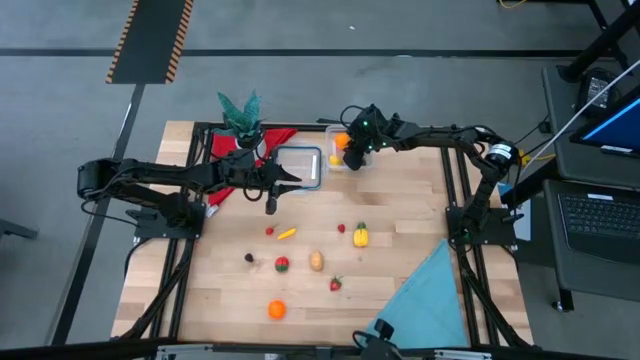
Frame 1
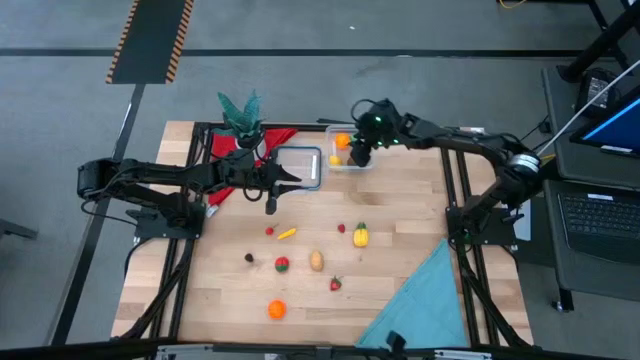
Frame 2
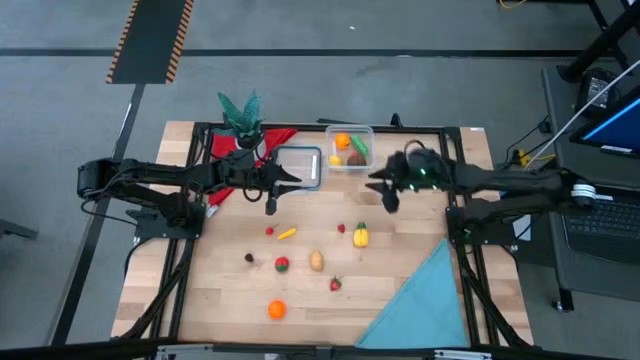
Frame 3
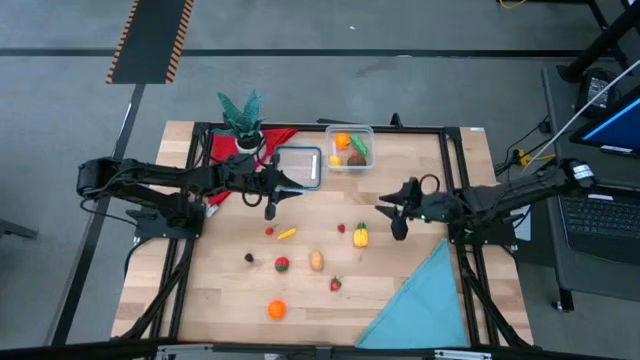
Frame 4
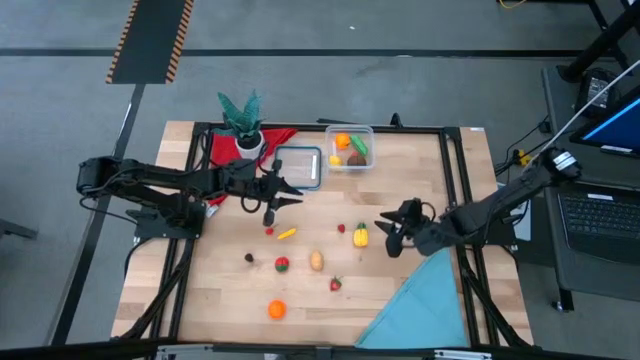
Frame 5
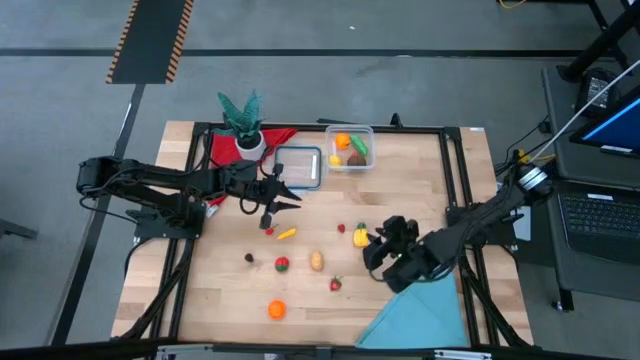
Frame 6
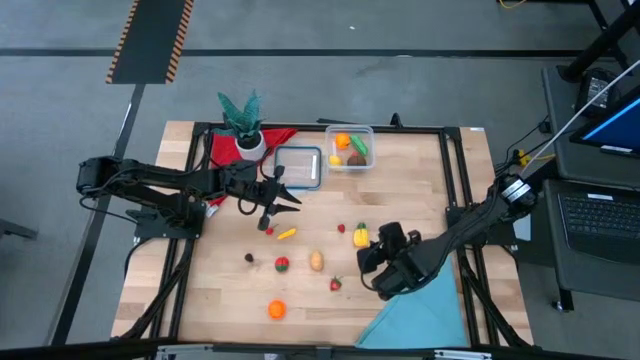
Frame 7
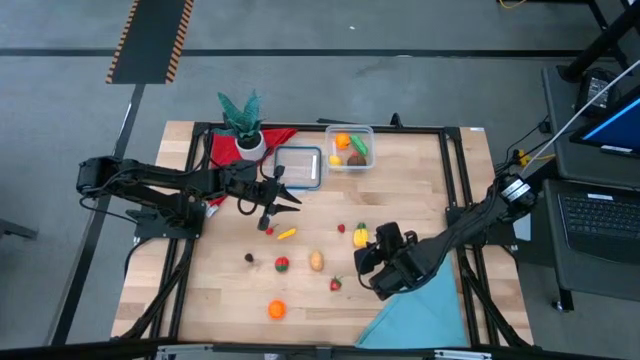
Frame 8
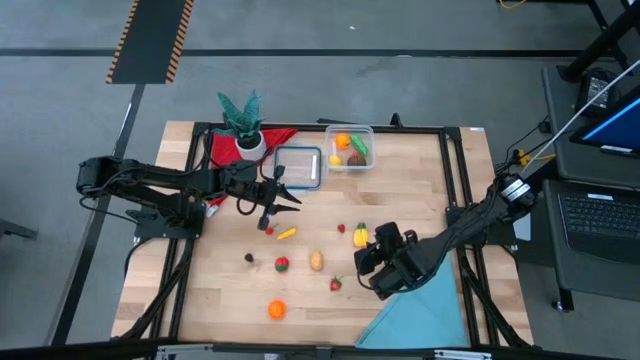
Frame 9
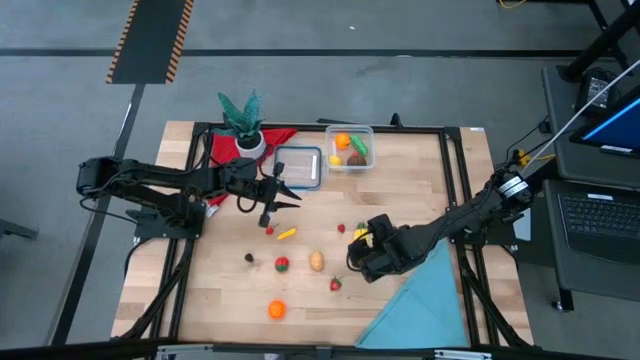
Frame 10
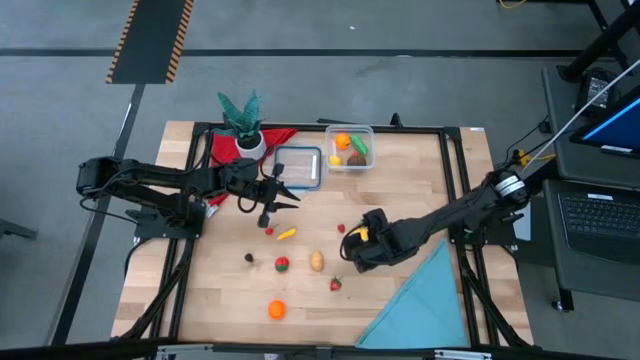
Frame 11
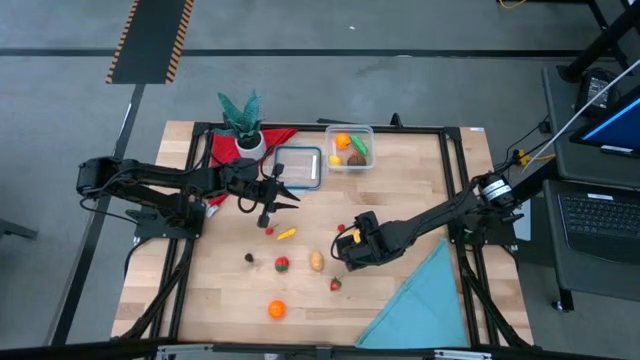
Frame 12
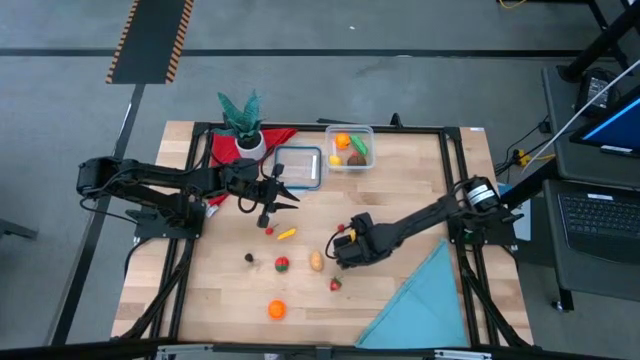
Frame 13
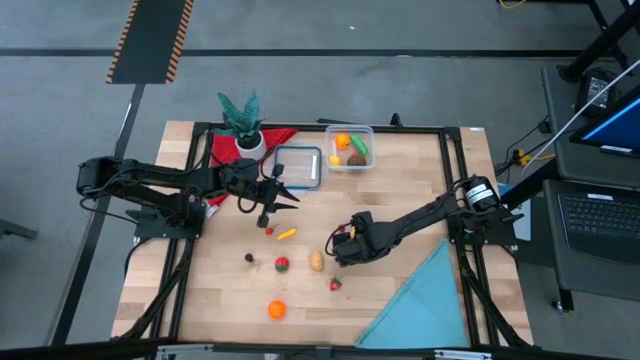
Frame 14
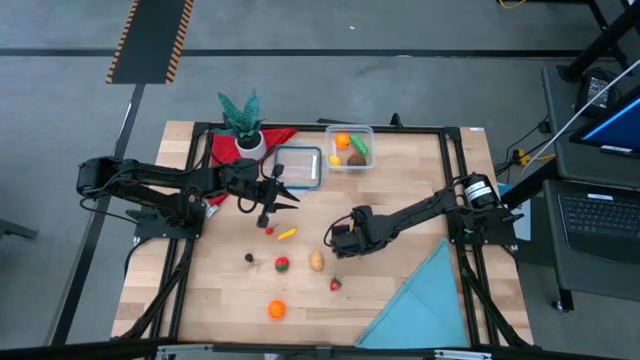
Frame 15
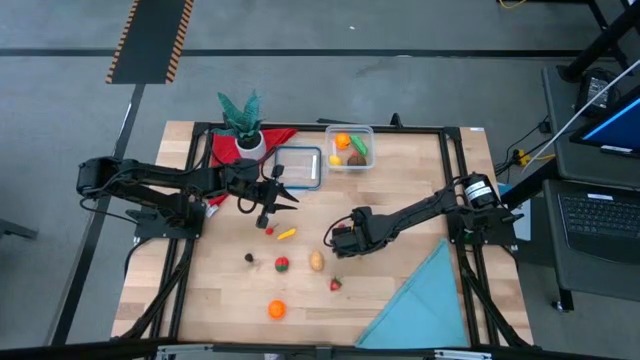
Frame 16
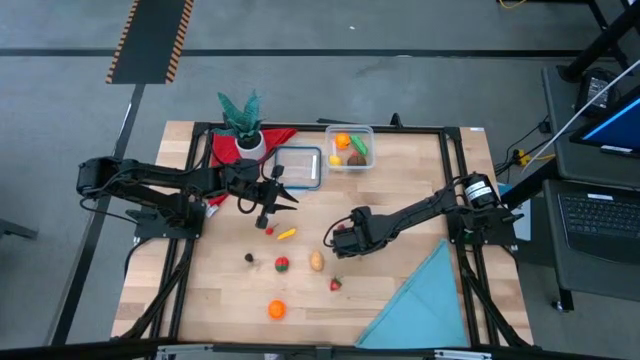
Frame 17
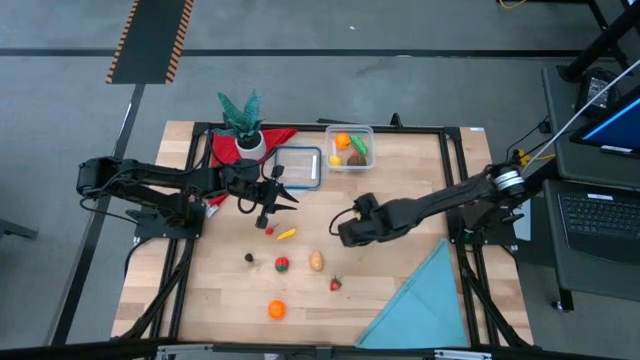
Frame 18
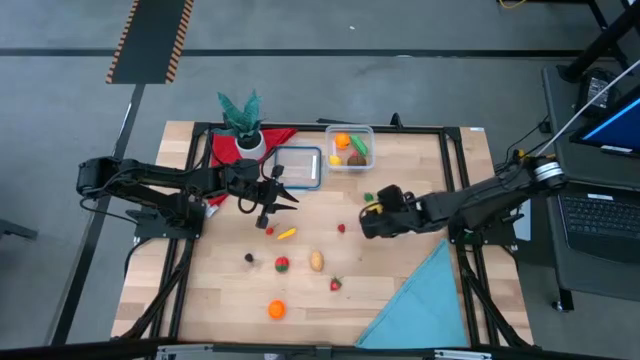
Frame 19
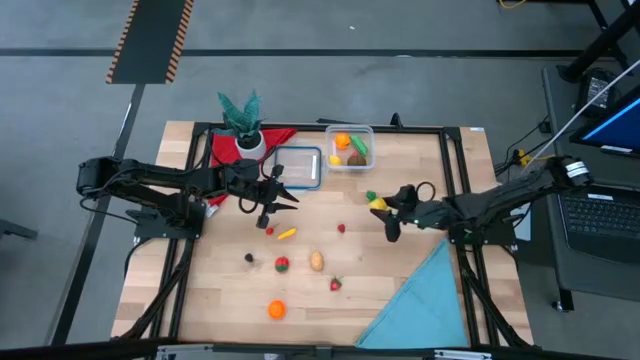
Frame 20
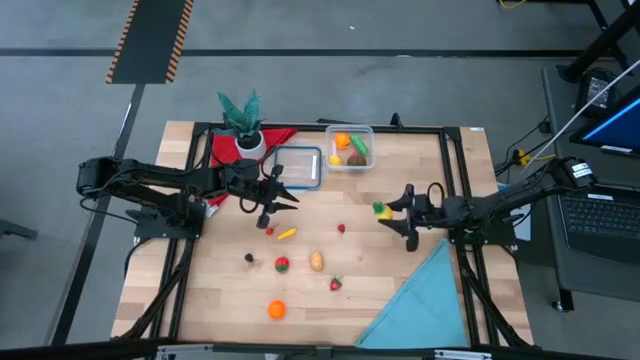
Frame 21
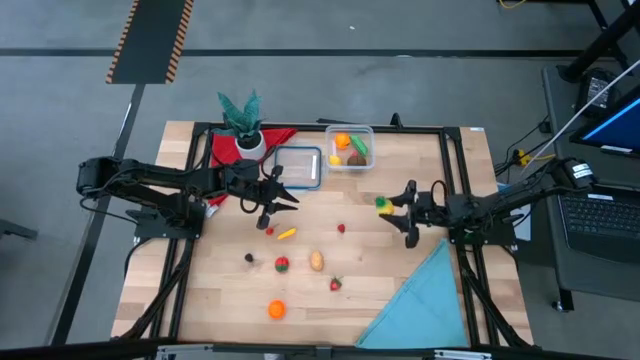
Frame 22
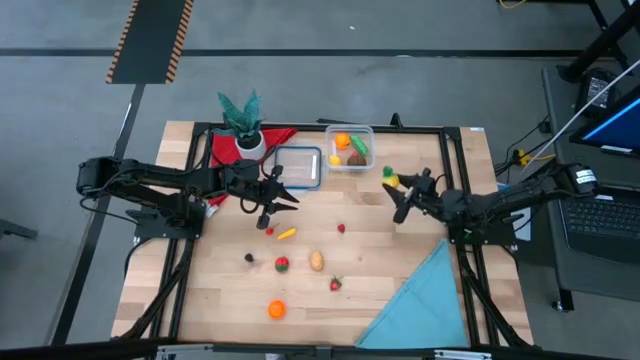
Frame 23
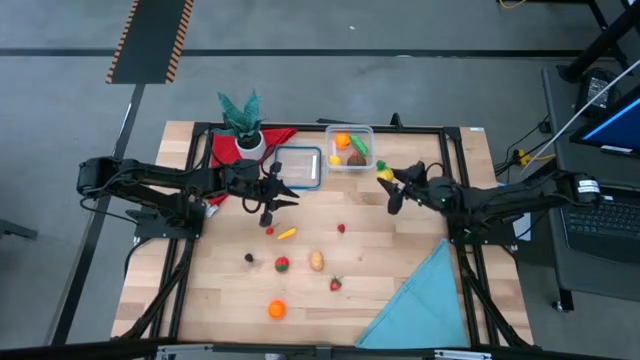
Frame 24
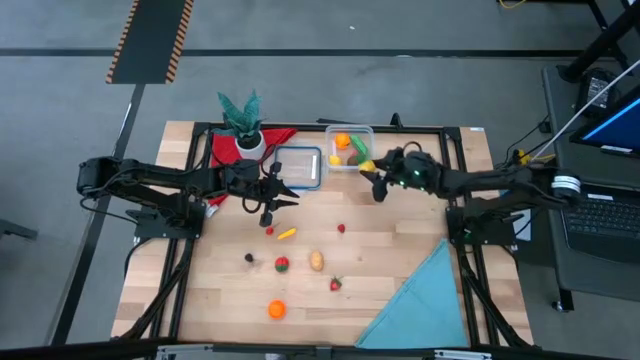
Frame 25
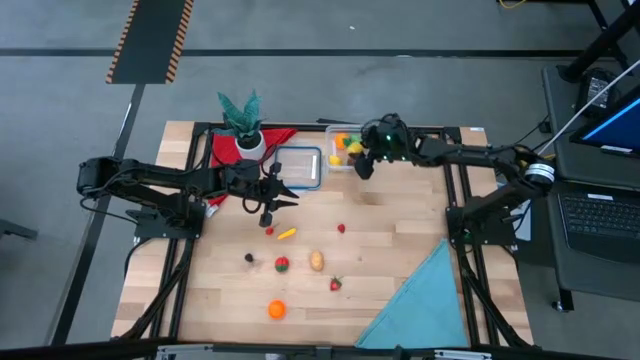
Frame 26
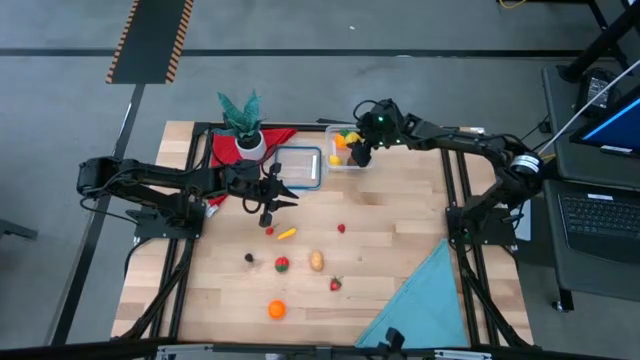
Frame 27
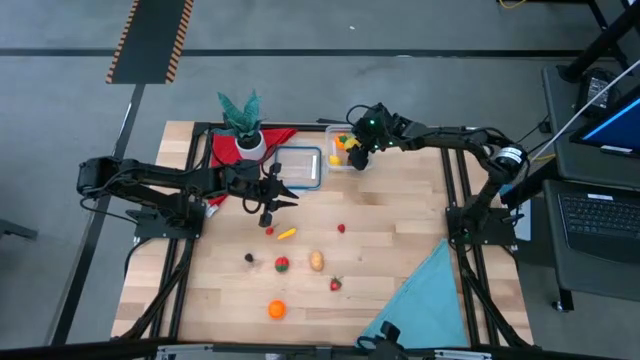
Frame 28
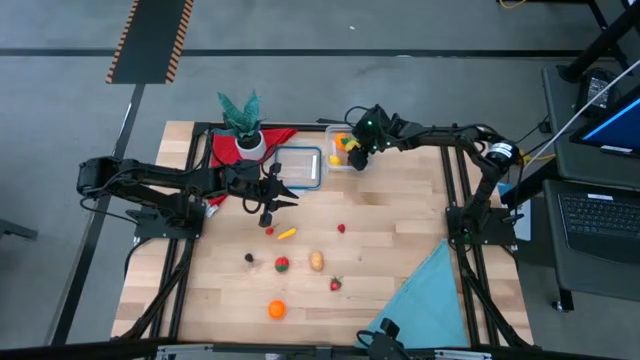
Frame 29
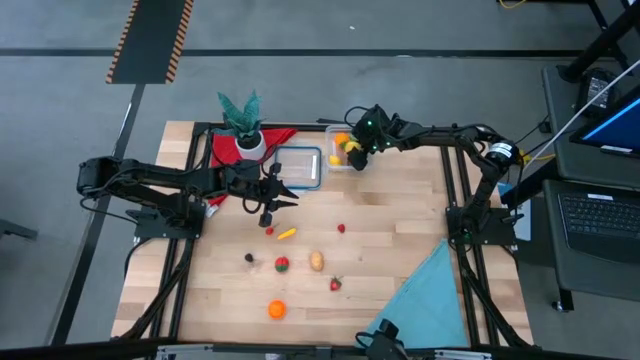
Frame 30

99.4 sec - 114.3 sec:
Task: Pick and placing Produce into tupperware
Put the pineapple into the transparent bin

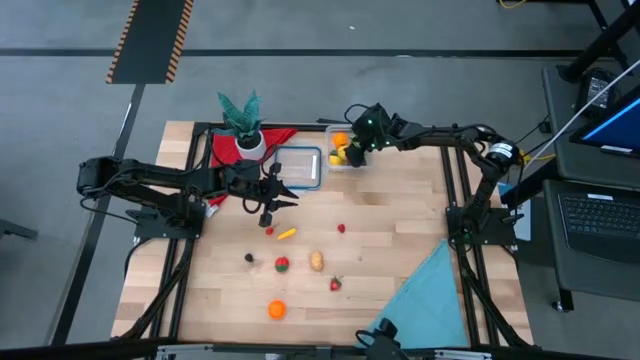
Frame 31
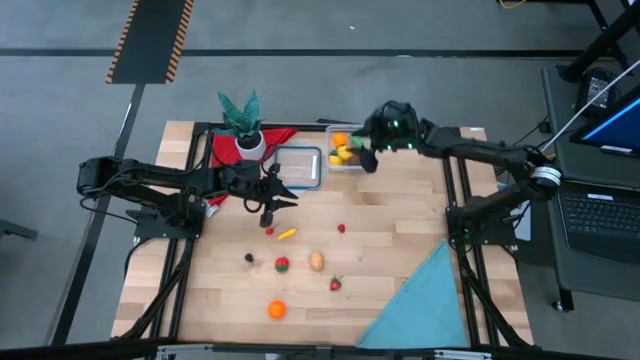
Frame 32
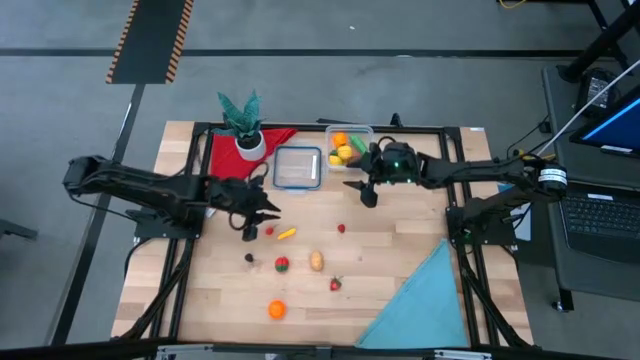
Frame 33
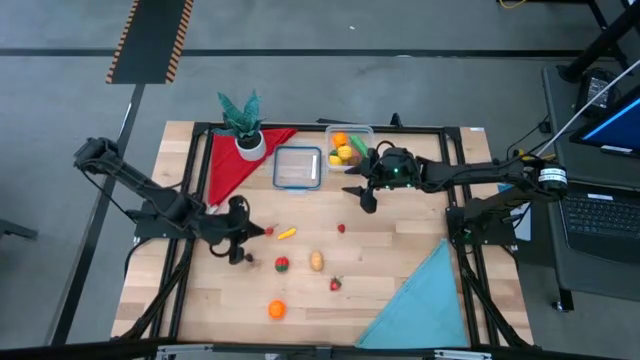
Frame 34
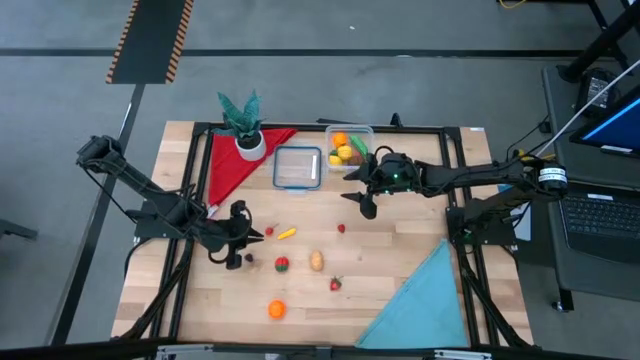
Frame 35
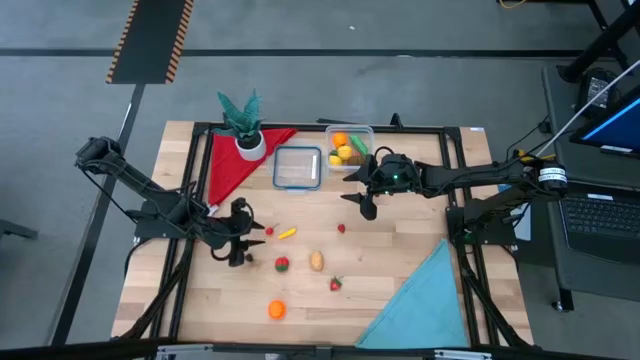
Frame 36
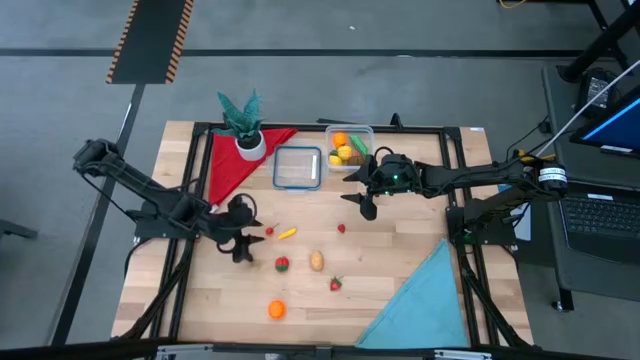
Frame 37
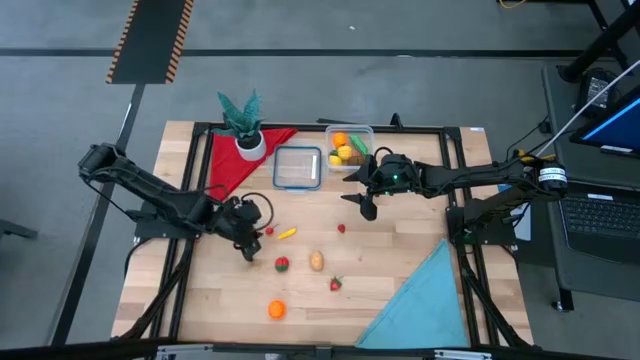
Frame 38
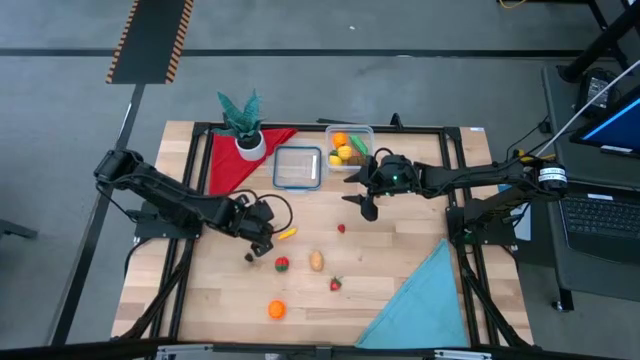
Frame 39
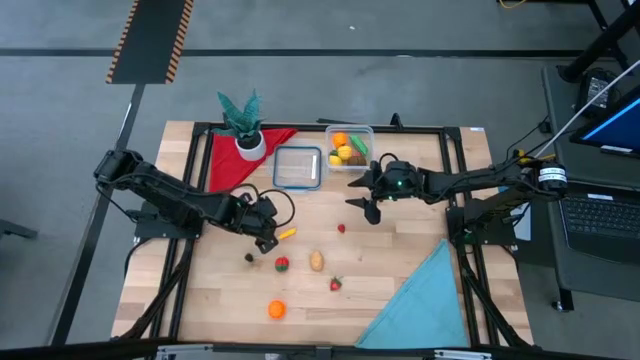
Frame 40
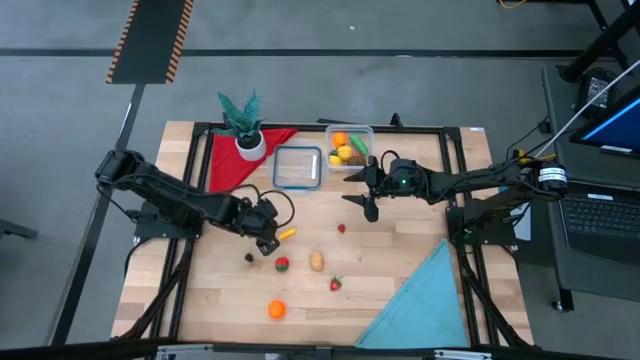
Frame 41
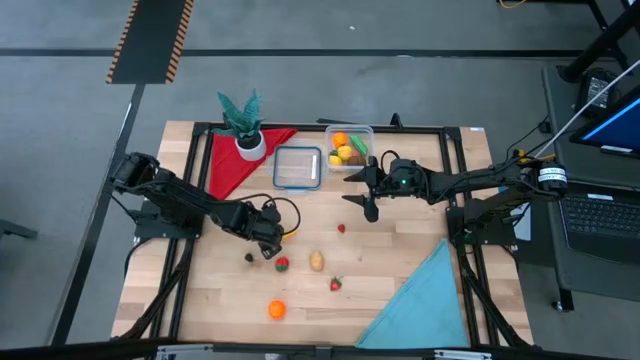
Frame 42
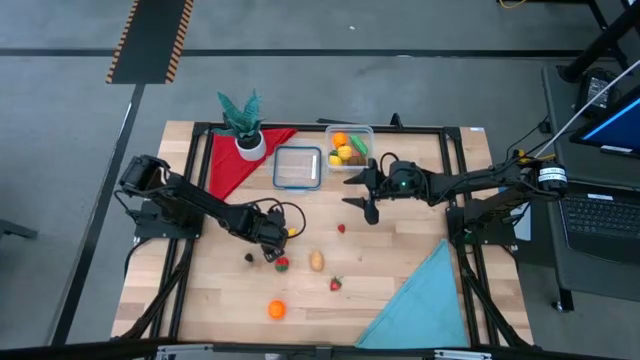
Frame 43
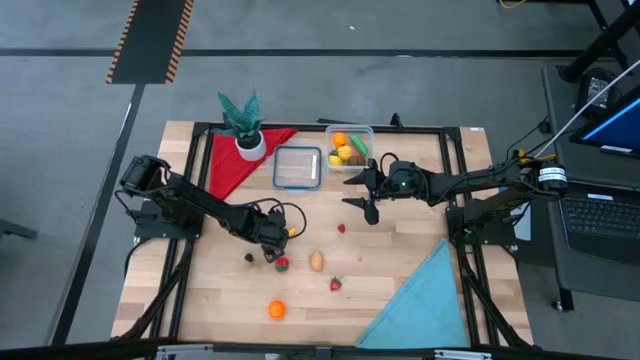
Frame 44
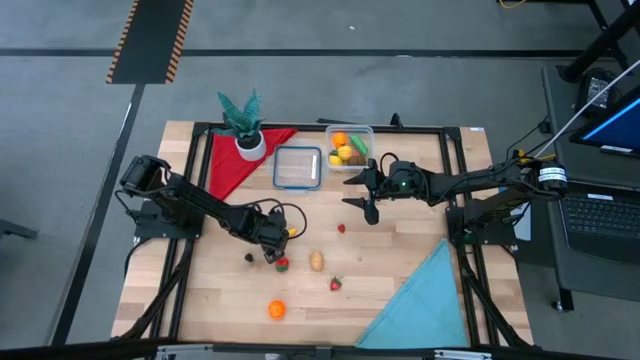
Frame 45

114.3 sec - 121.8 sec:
Put the cherry into the transparent bin
